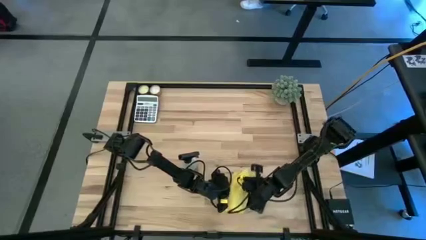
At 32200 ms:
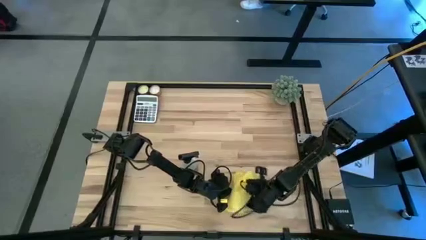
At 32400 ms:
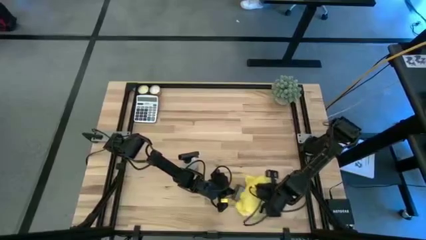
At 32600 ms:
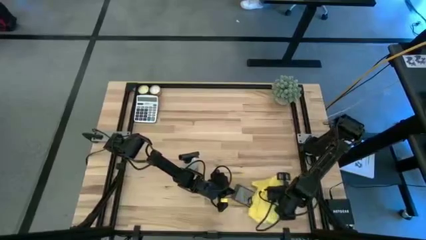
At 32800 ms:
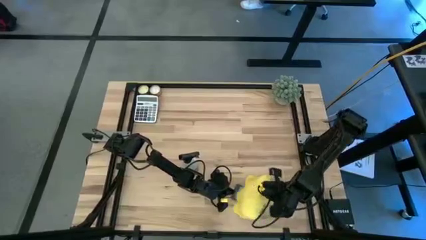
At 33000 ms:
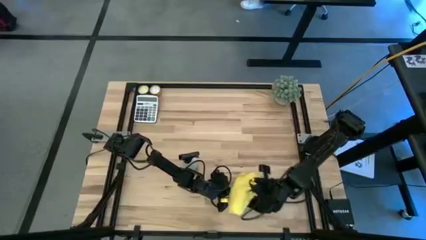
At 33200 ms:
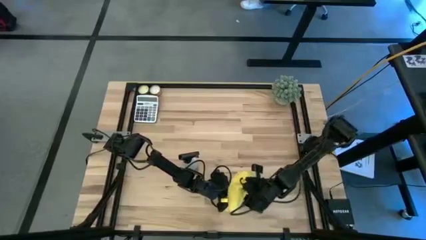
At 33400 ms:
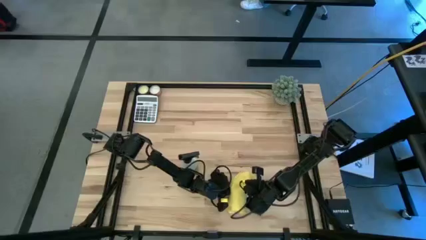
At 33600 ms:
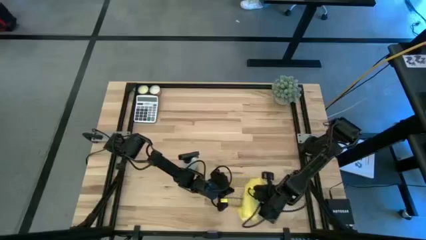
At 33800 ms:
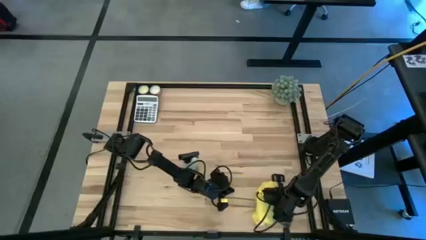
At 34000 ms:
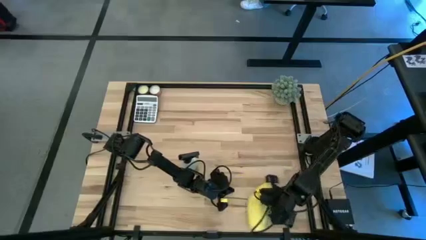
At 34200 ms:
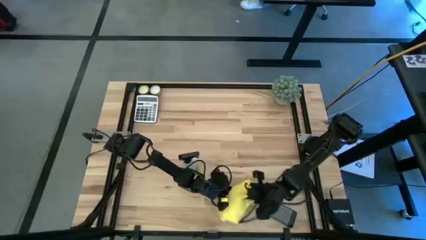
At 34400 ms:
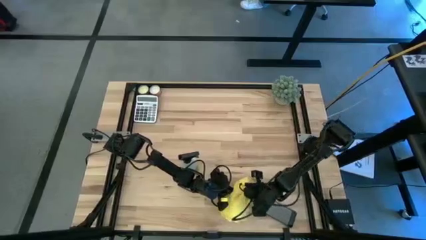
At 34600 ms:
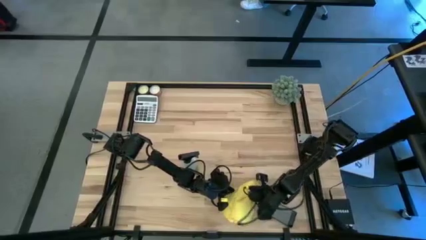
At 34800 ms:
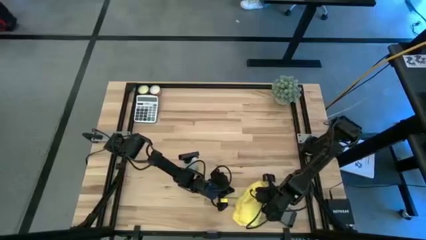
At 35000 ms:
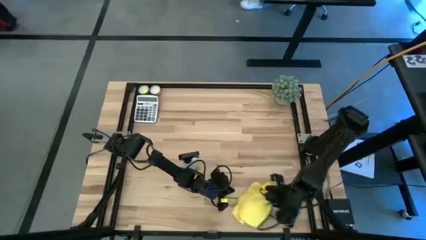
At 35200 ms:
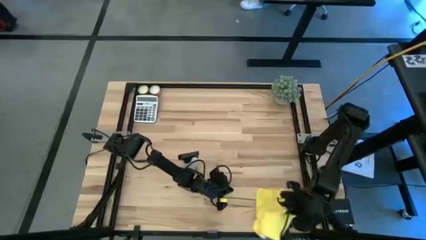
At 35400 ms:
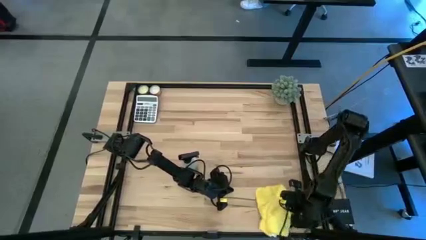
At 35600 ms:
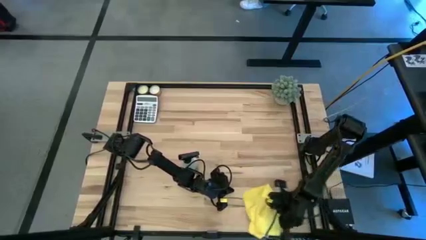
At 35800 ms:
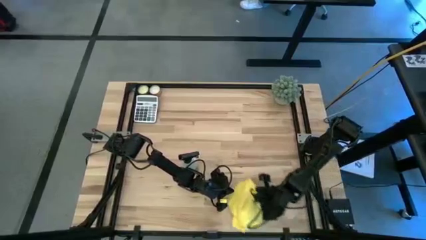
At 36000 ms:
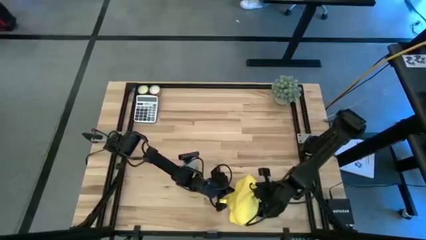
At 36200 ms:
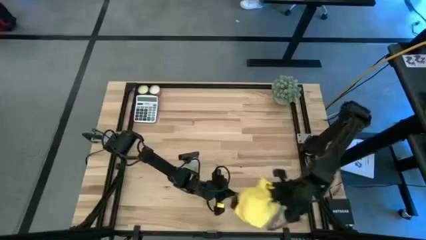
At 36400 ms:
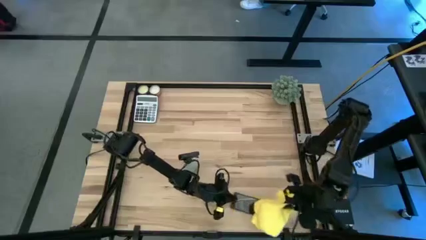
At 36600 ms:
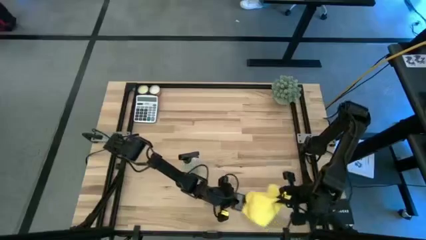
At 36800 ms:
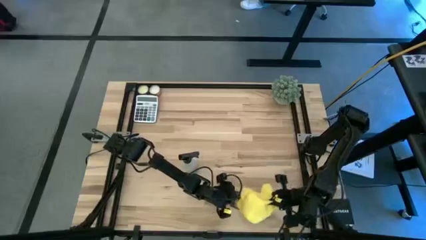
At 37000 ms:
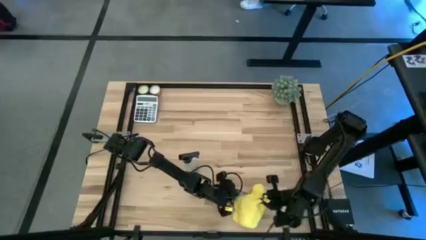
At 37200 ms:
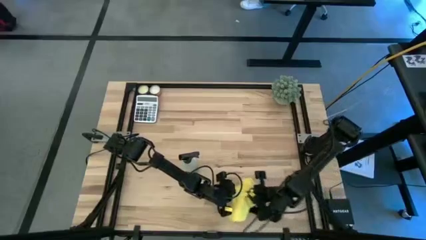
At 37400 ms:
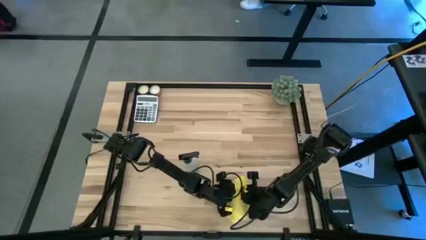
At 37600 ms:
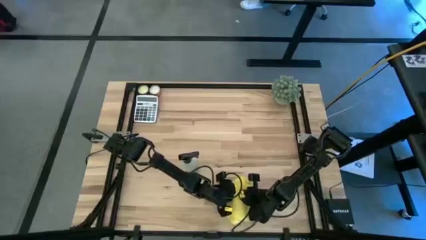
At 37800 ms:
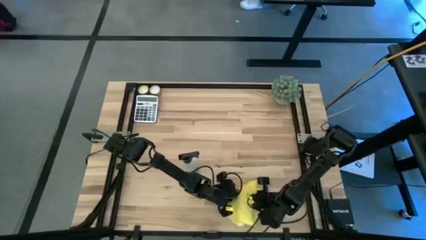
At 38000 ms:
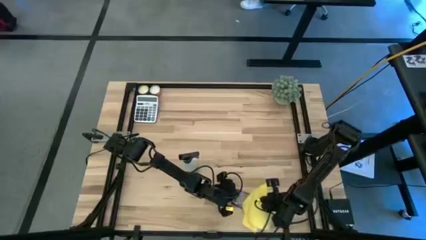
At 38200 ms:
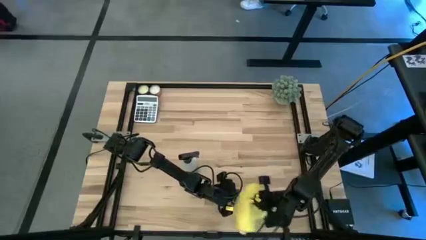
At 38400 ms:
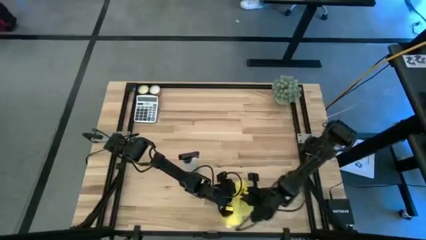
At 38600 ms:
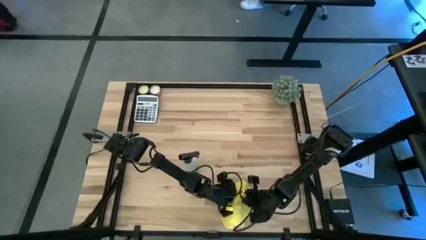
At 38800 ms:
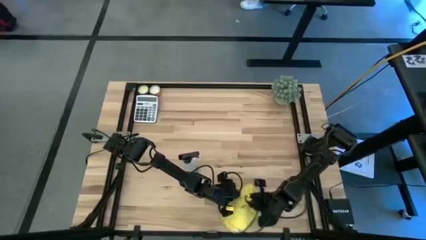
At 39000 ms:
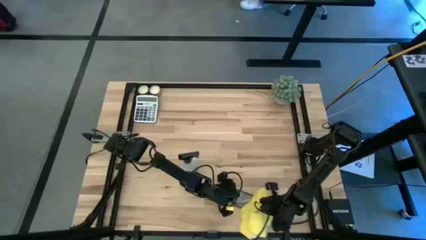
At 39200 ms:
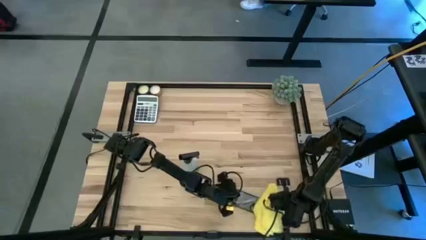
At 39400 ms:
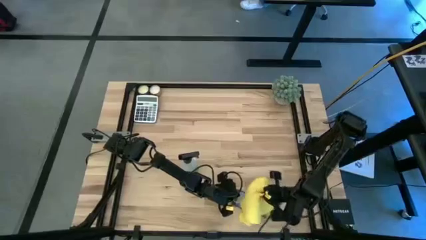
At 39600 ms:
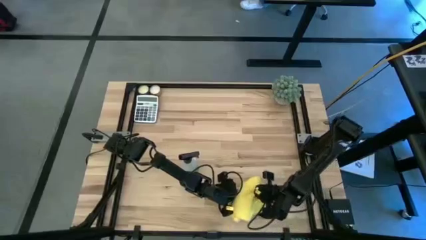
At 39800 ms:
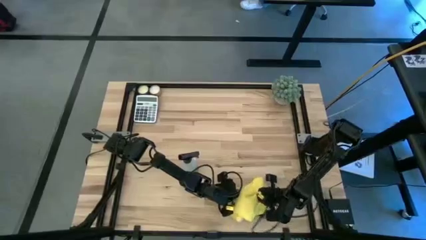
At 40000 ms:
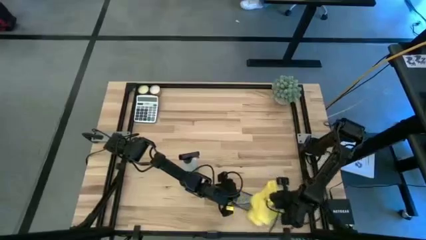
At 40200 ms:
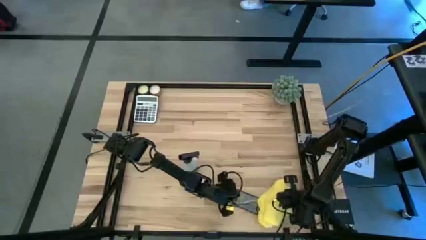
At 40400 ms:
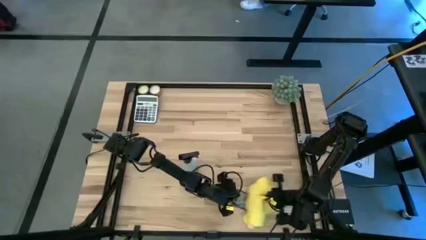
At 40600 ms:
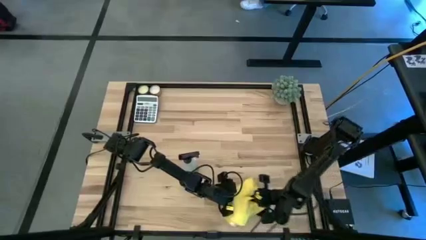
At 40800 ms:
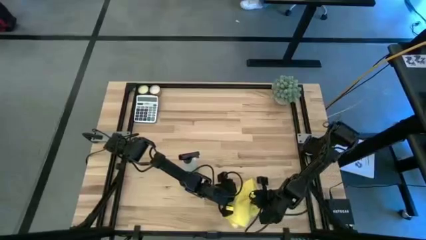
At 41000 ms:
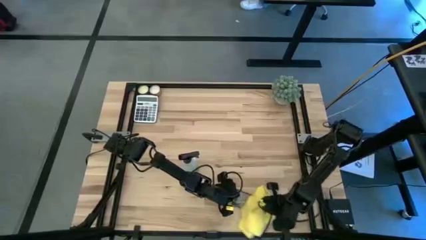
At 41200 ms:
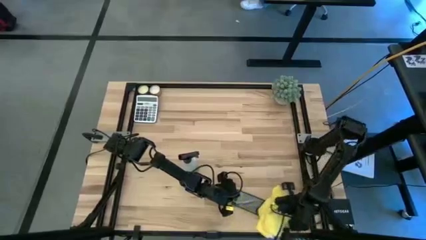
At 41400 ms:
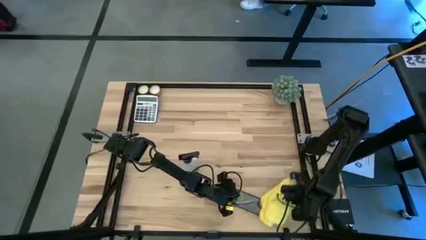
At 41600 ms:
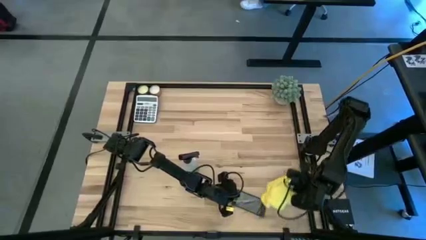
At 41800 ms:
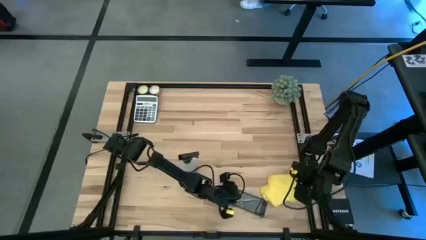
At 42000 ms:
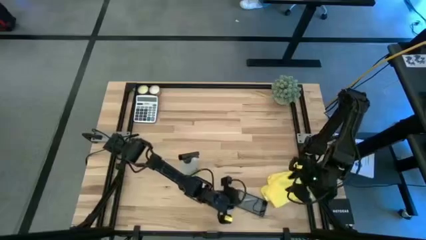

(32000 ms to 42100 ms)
Task: Apply microfiber cloth
Wipe the front screen of the black cellphone using a yellow microfiber cloth

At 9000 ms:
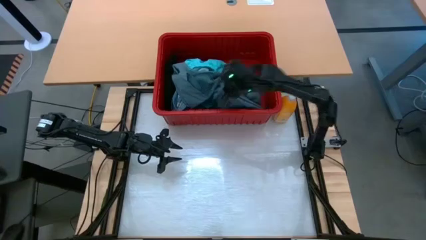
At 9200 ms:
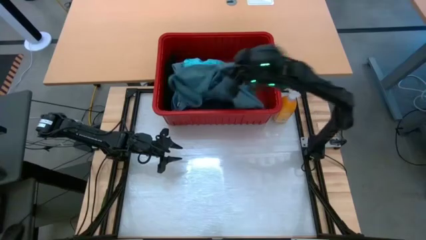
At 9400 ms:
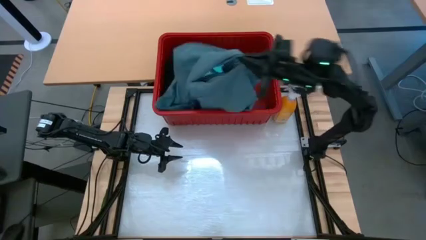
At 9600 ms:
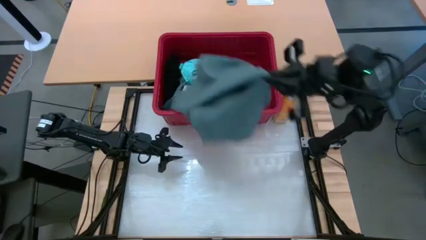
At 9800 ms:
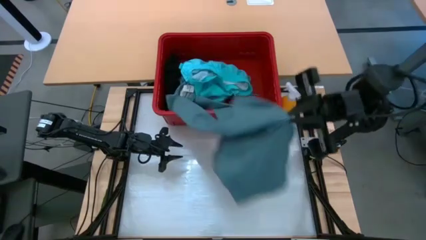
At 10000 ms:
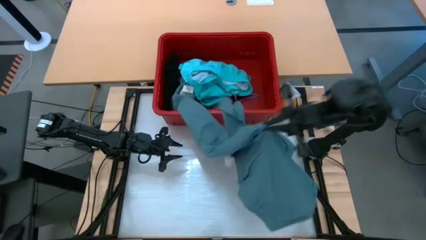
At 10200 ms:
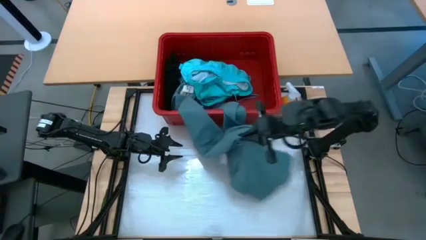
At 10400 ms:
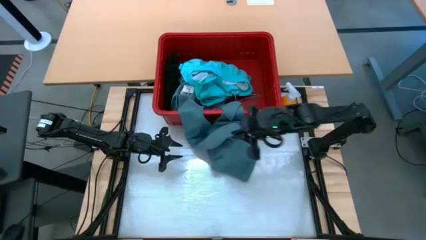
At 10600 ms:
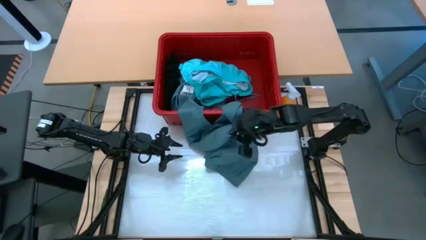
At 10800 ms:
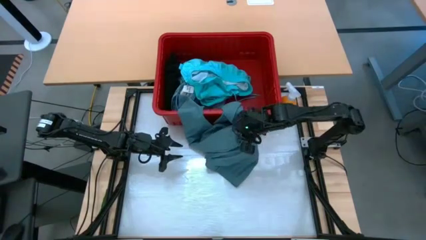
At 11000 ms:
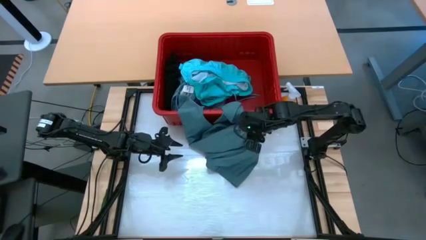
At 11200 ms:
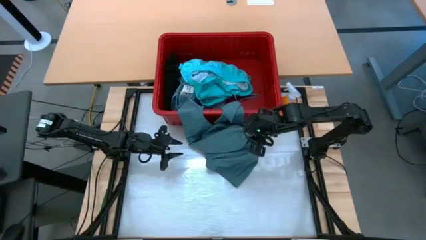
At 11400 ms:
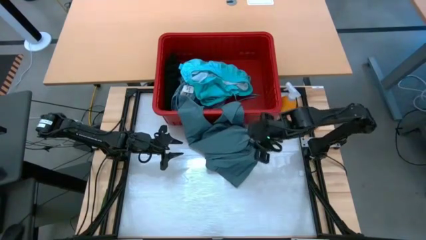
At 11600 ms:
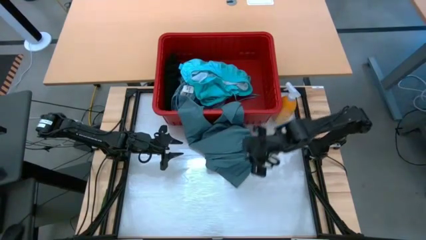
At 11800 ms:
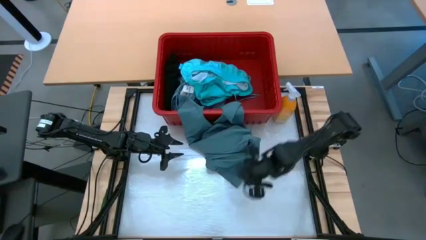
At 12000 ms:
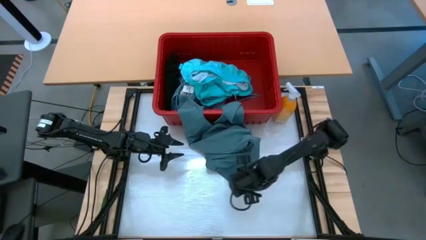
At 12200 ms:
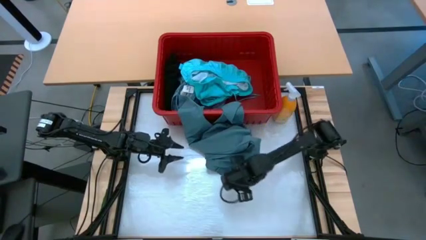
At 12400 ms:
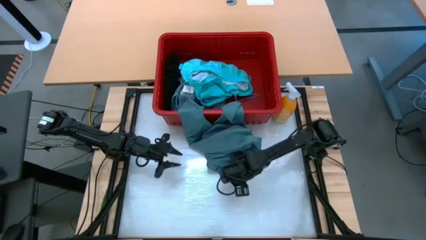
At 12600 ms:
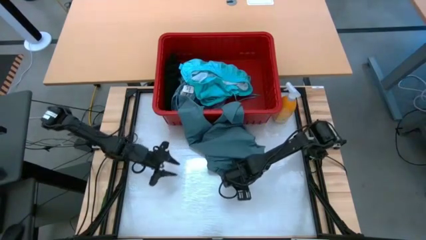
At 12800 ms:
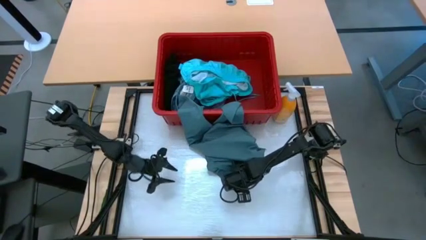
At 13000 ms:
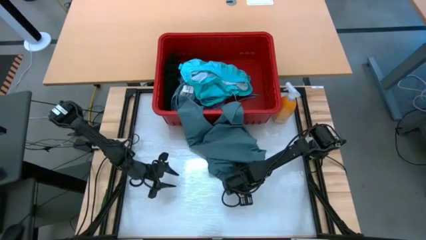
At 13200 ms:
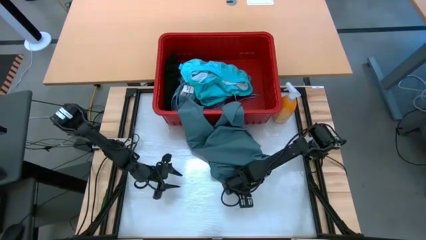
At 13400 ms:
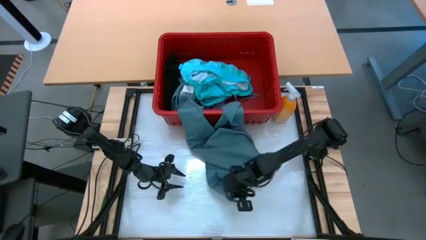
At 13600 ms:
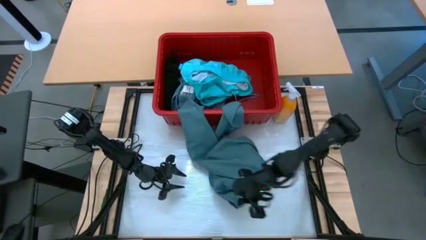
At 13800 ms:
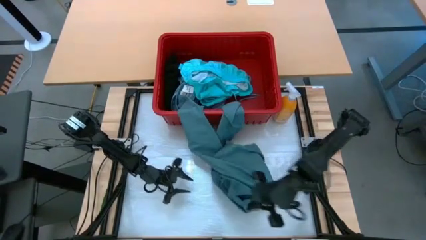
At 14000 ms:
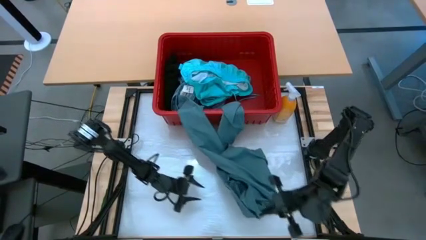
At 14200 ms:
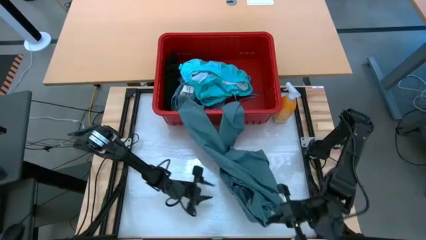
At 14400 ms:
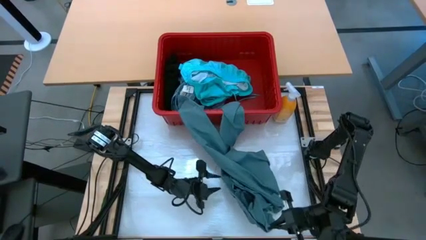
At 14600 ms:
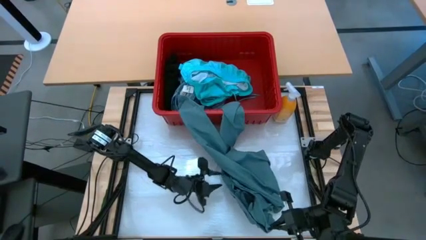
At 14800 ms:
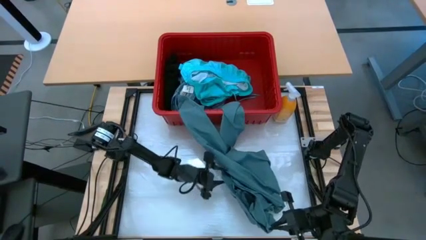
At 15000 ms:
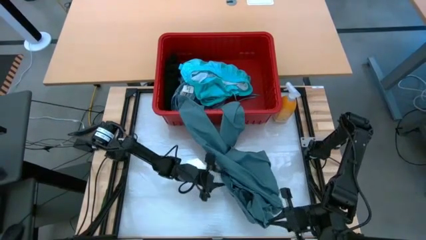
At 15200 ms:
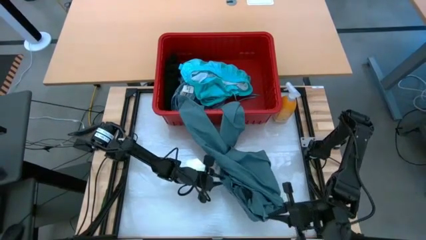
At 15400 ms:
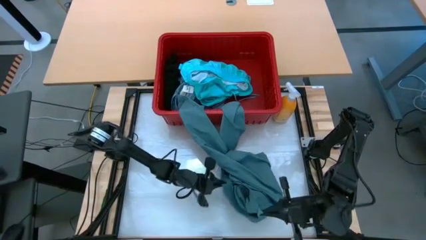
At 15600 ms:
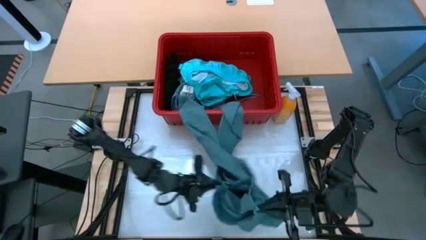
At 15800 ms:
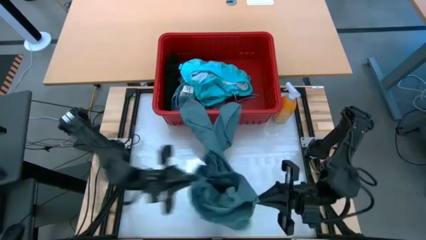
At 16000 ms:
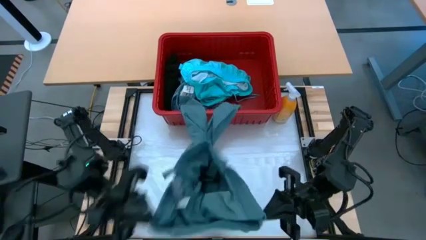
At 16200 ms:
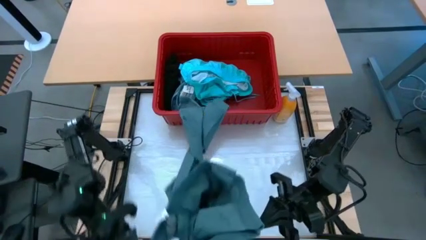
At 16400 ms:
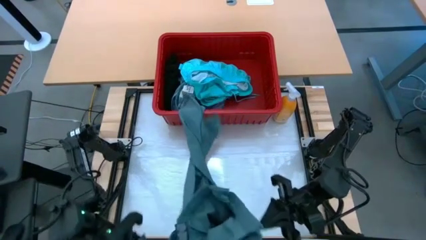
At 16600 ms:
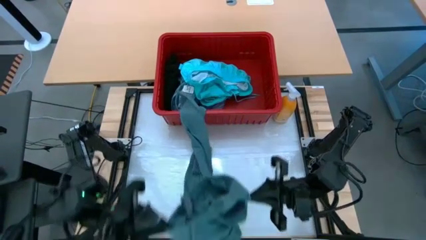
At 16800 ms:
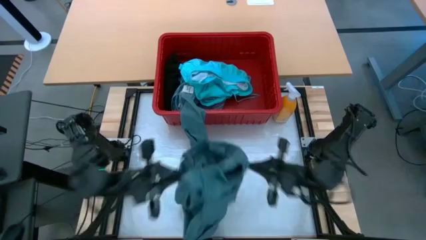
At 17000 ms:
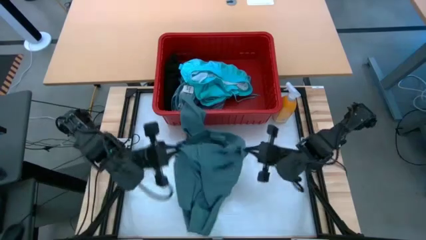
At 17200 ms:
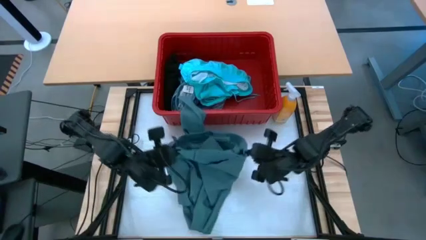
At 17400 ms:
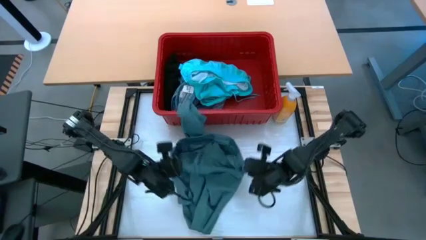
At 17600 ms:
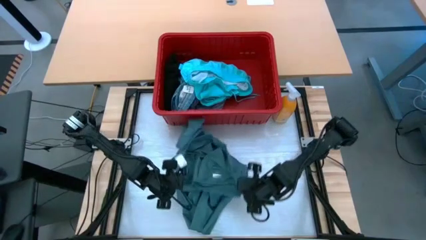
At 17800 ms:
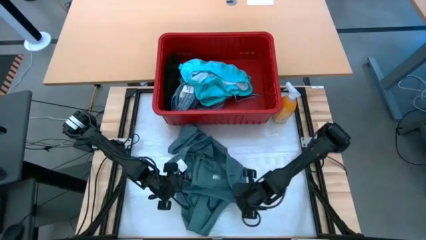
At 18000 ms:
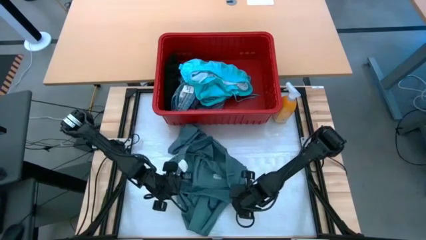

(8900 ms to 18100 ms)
Task: Fold Laundry from Bin
Remove the light blue pants from the red laundry bin onto the table
